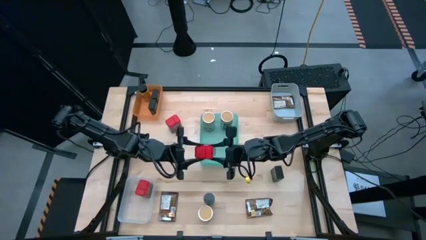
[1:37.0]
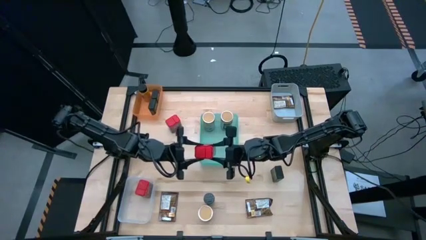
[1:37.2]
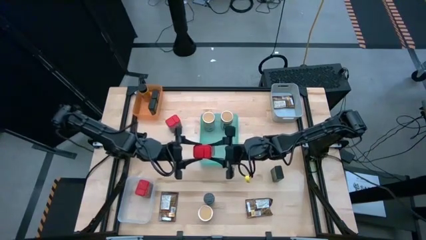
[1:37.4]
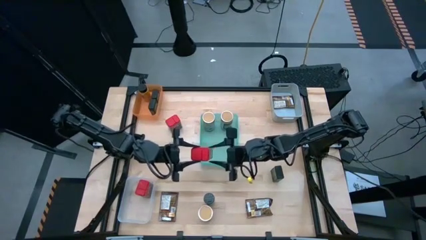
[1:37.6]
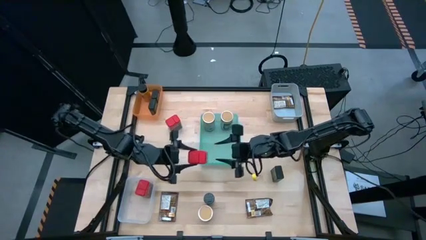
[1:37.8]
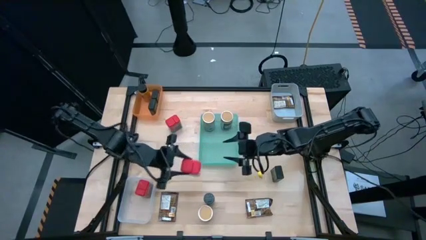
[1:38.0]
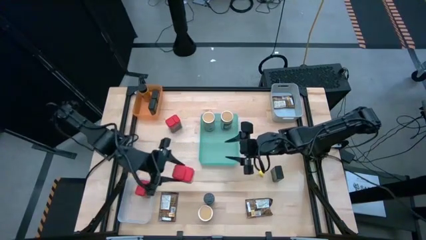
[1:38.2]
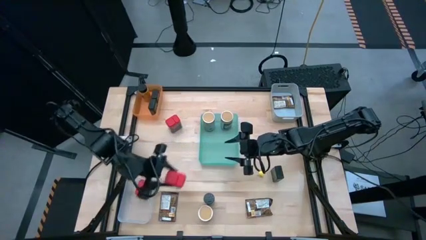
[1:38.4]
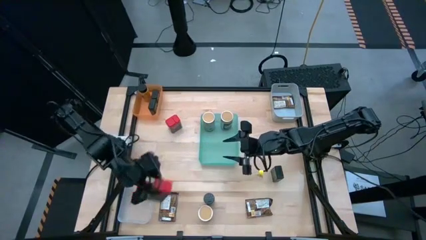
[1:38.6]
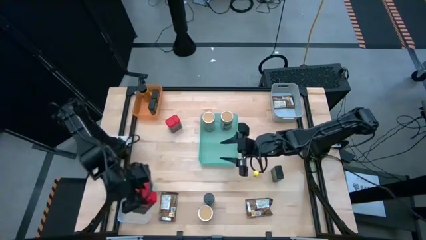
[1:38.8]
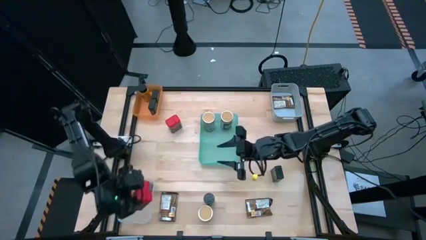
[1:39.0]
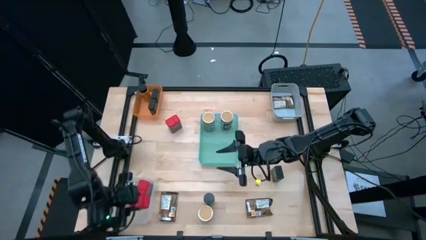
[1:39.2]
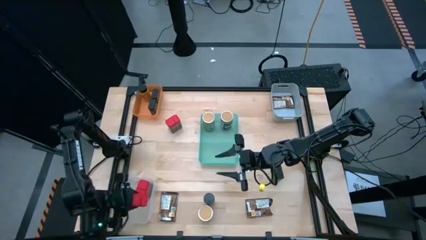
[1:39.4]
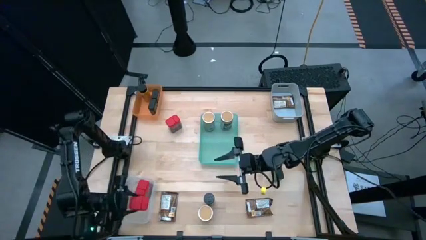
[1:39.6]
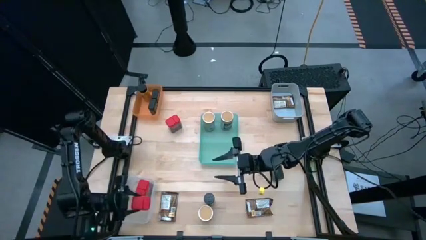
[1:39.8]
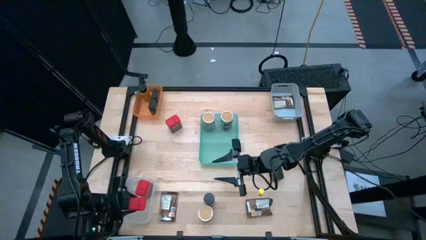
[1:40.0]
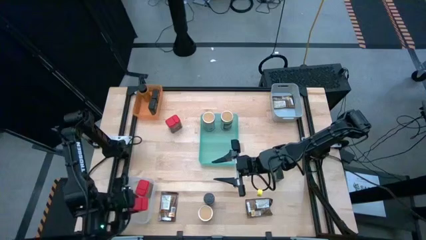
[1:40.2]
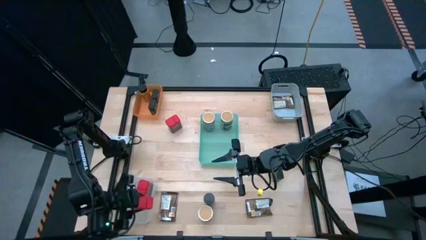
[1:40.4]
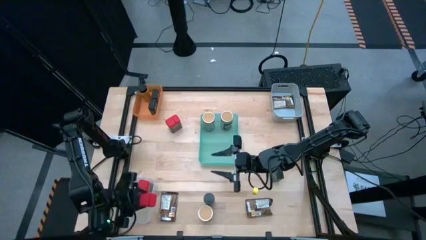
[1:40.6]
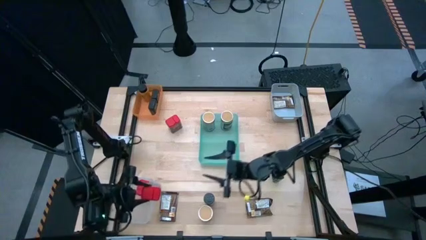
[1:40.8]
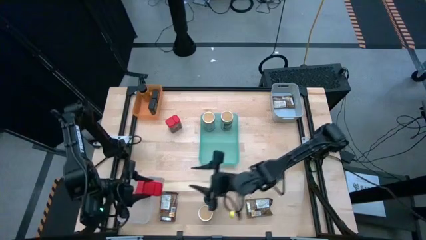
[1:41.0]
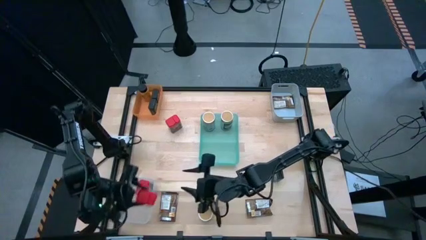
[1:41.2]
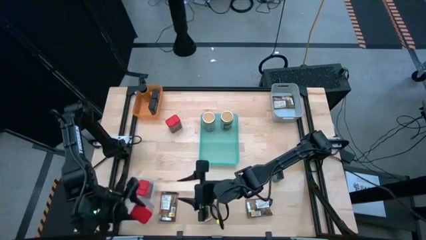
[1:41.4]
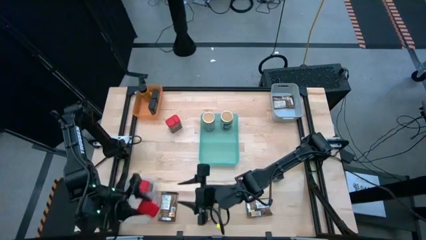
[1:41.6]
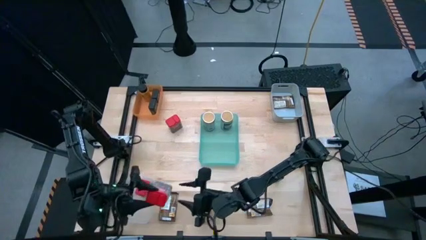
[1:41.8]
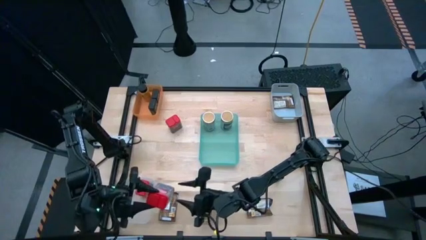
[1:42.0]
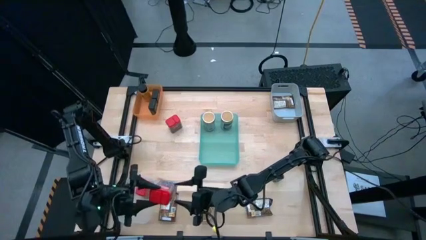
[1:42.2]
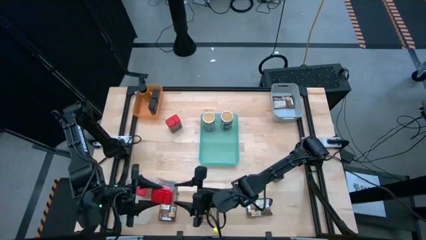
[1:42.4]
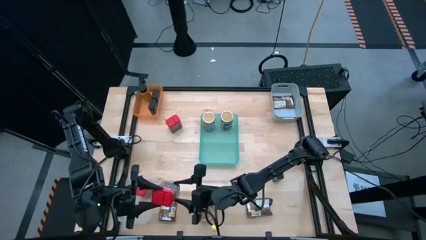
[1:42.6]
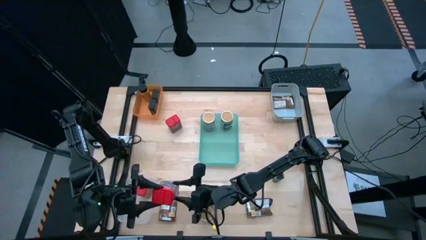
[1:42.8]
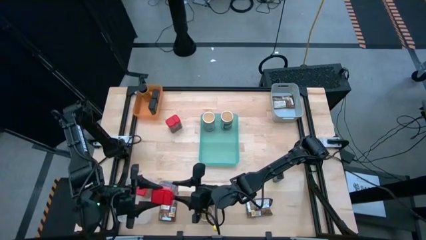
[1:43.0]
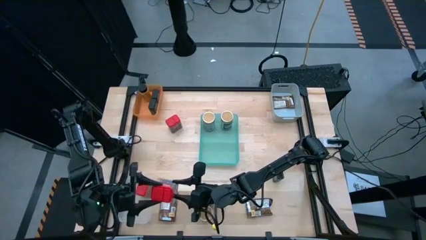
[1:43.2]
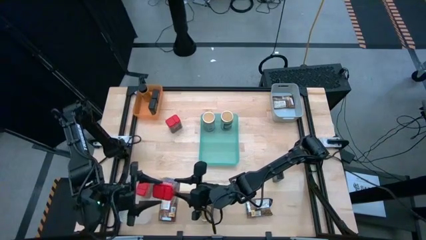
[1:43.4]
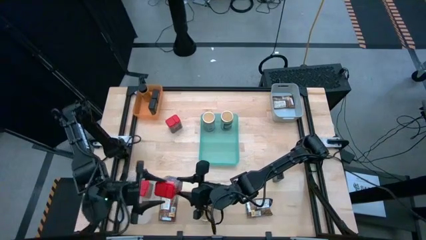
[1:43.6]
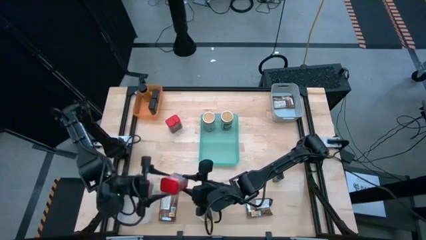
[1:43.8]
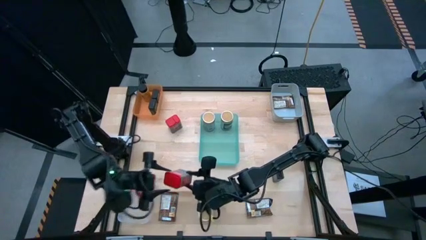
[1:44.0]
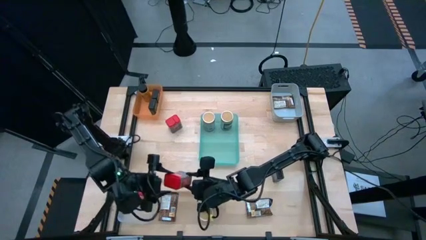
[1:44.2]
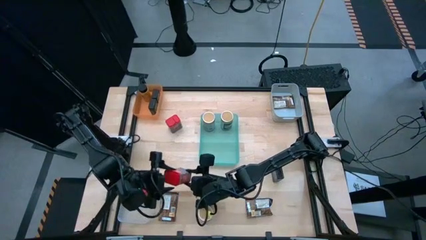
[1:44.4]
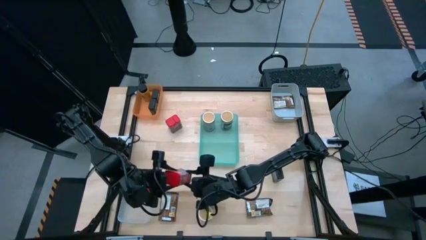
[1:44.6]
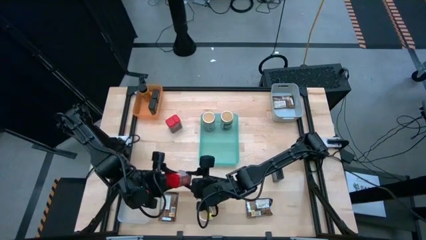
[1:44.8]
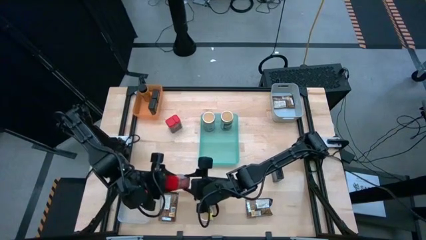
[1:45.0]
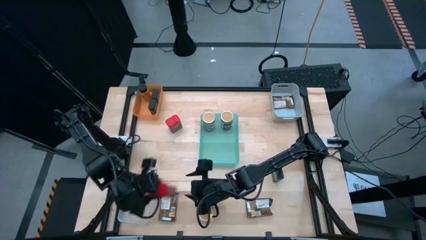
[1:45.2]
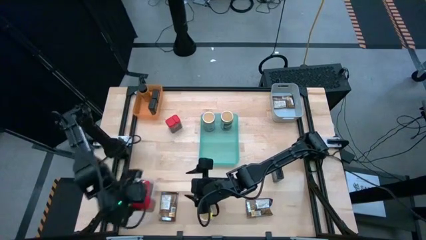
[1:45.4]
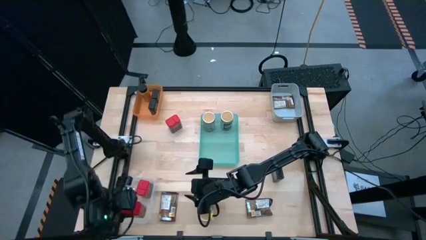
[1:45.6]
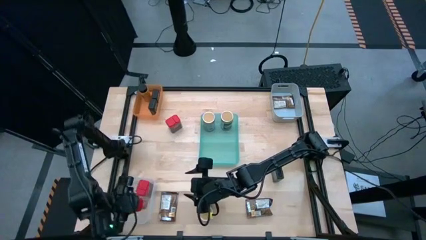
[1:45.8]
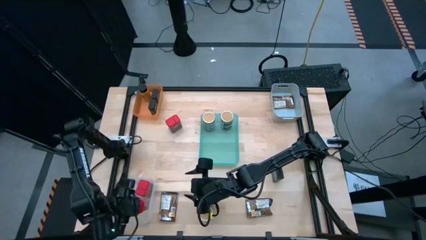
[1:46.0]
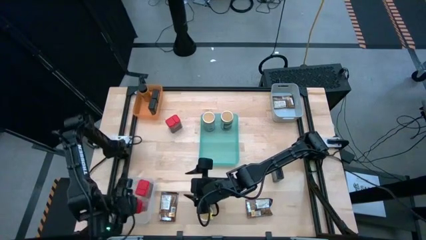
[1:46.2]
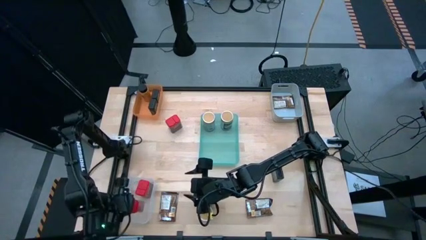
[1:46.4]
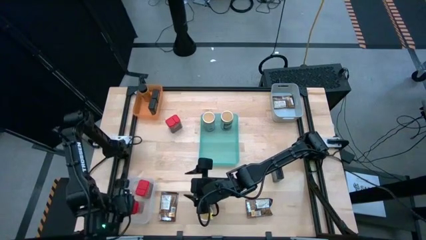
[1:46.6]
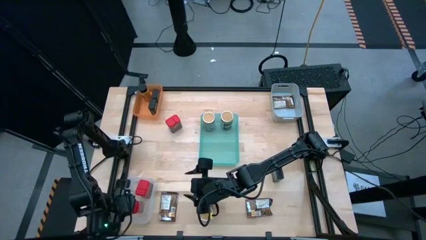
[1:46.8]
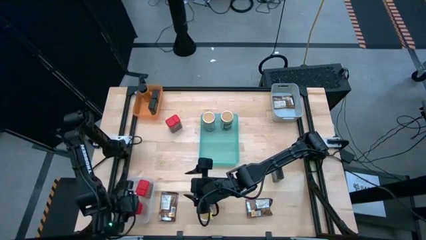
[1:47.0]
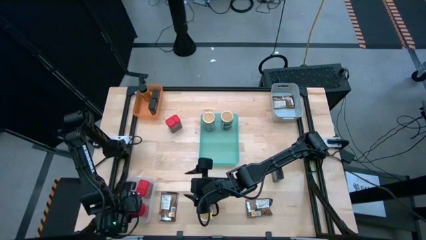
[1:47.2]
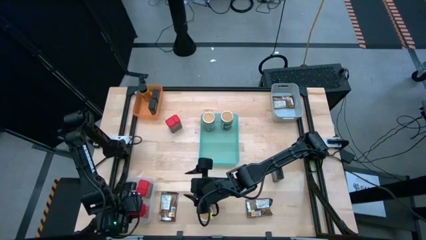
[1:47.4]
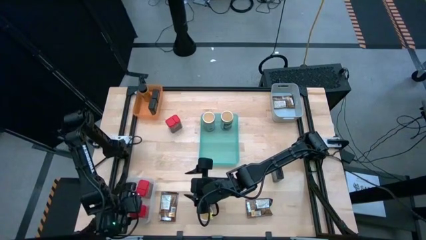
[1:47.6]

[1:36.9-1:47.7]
Task: Sort spices by type
Put the right red seasoning can into the transparent bin
